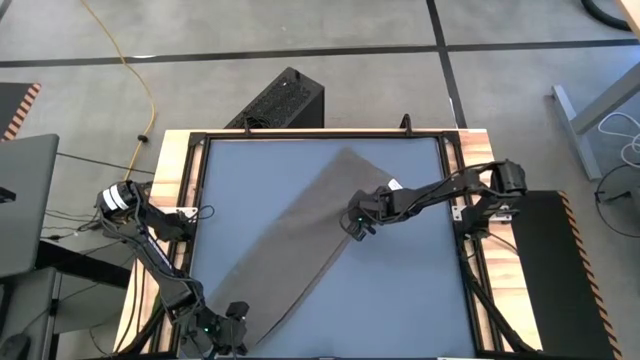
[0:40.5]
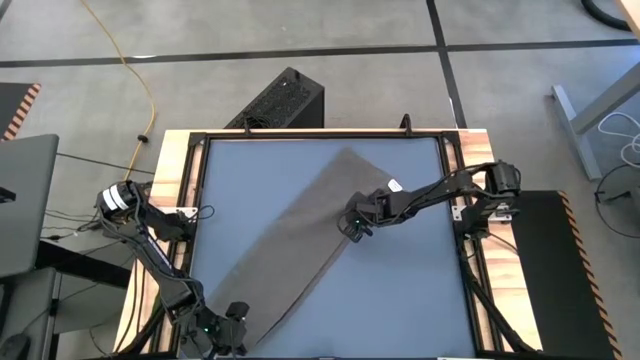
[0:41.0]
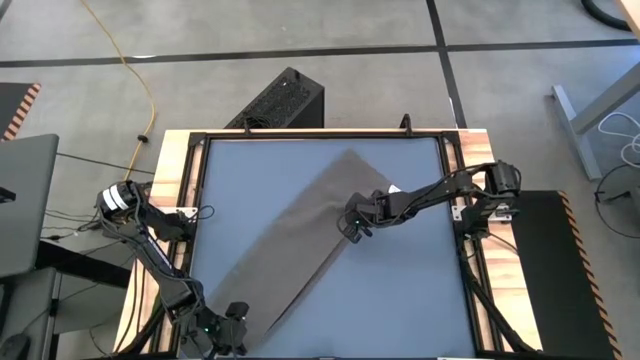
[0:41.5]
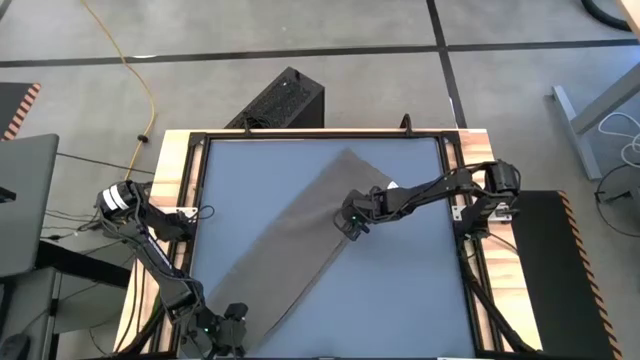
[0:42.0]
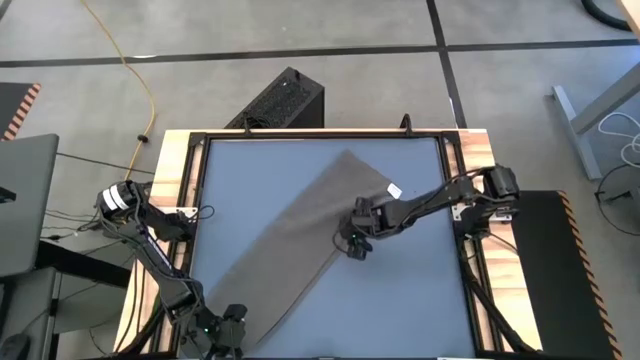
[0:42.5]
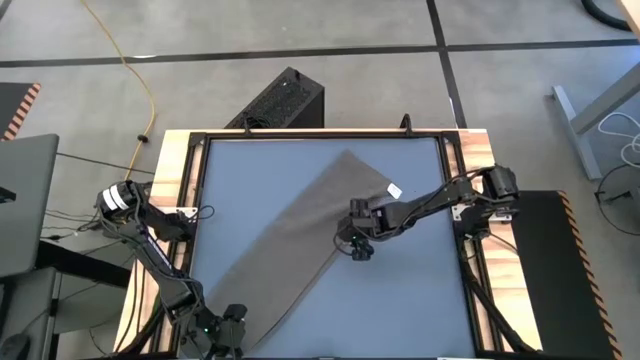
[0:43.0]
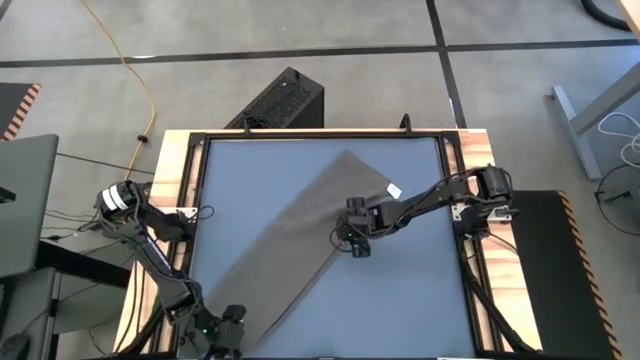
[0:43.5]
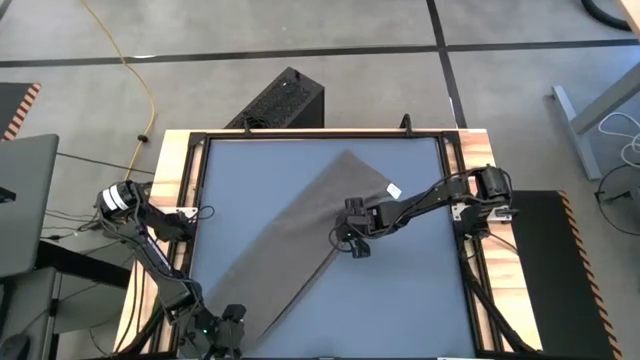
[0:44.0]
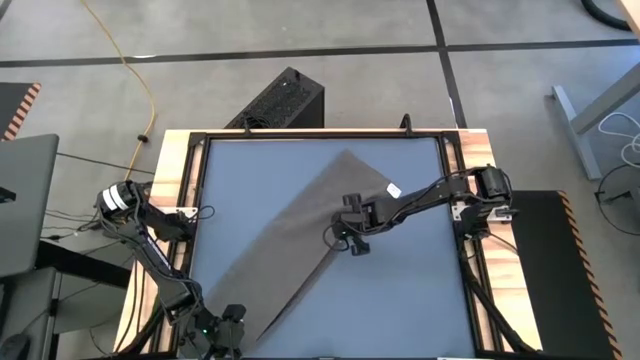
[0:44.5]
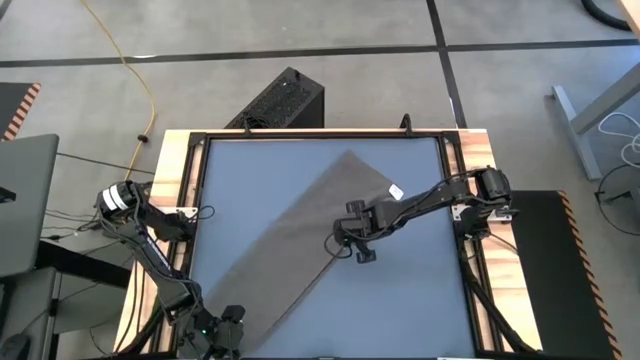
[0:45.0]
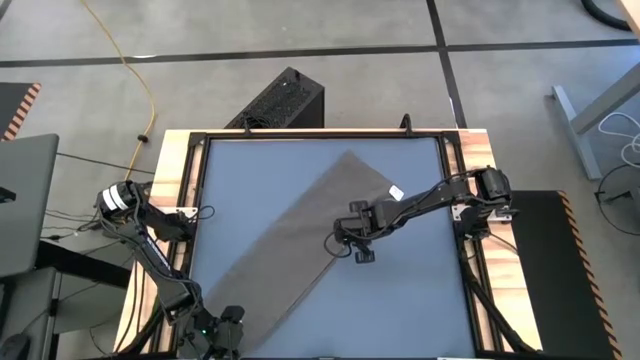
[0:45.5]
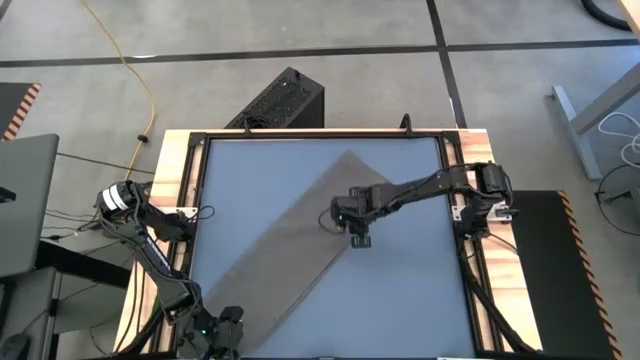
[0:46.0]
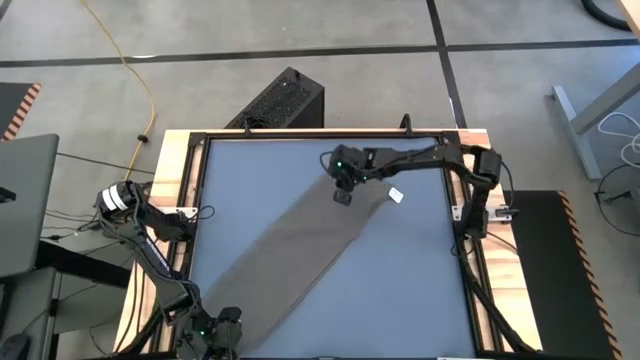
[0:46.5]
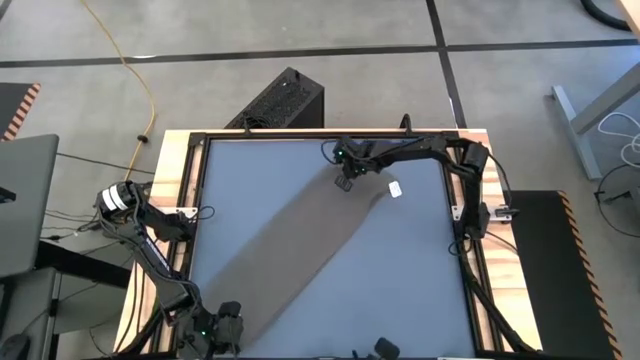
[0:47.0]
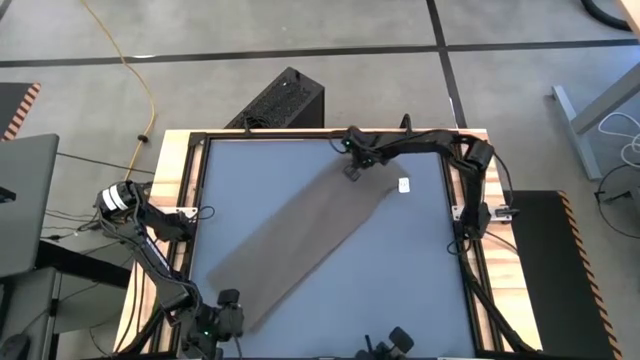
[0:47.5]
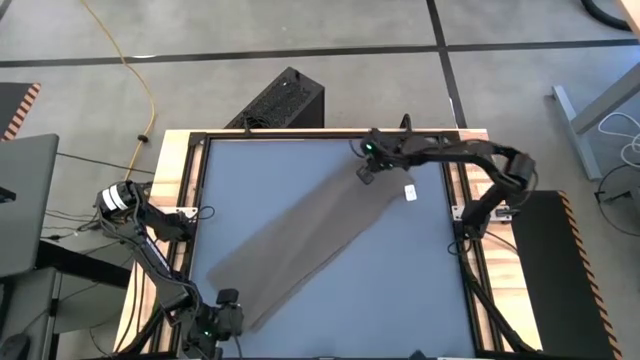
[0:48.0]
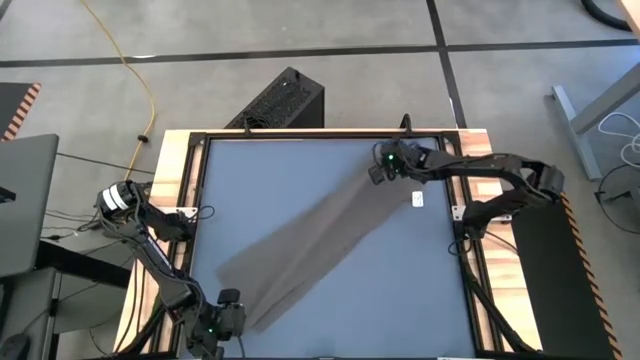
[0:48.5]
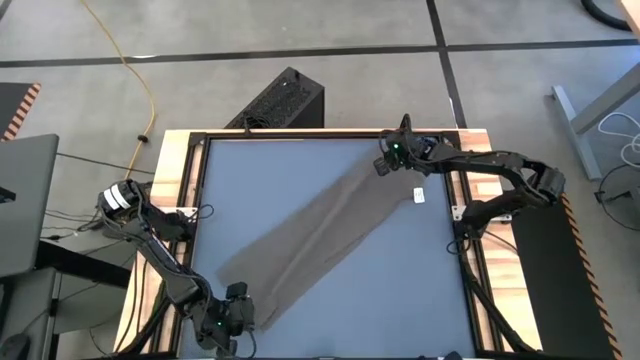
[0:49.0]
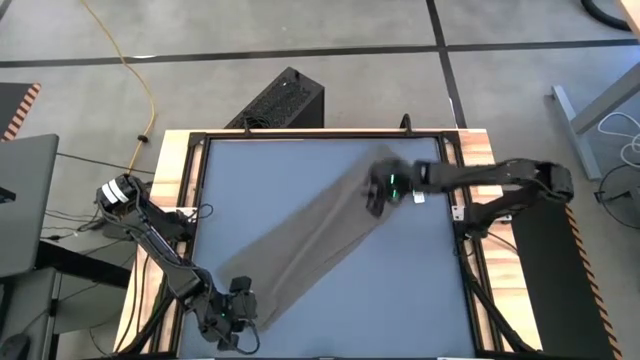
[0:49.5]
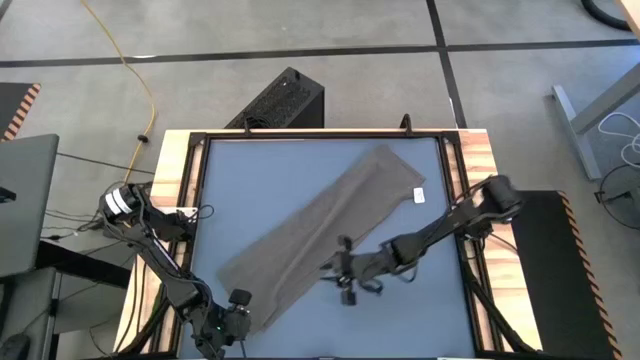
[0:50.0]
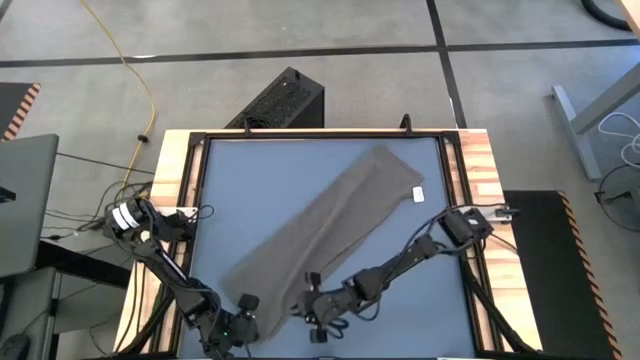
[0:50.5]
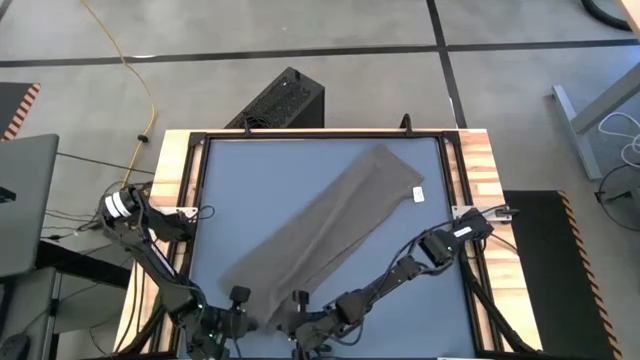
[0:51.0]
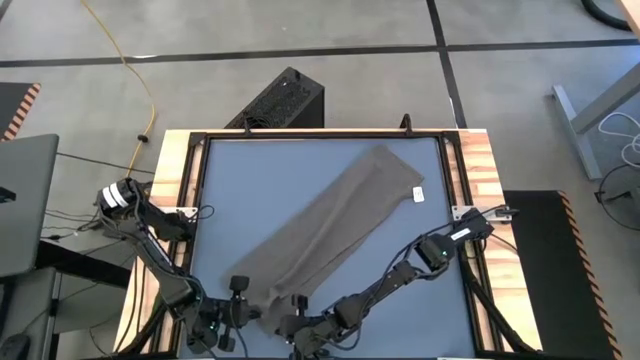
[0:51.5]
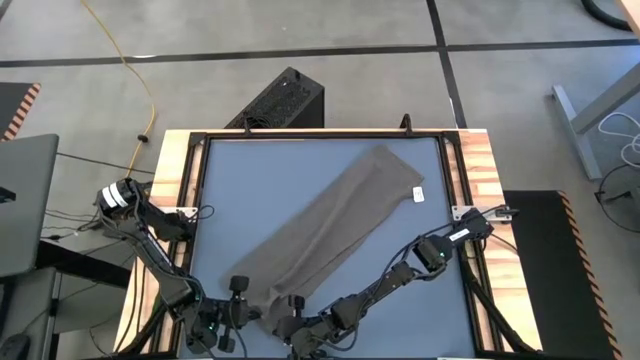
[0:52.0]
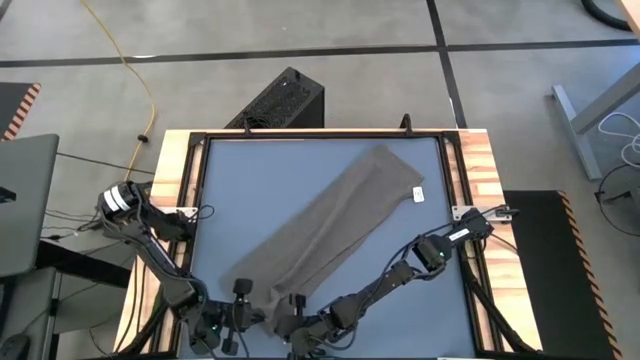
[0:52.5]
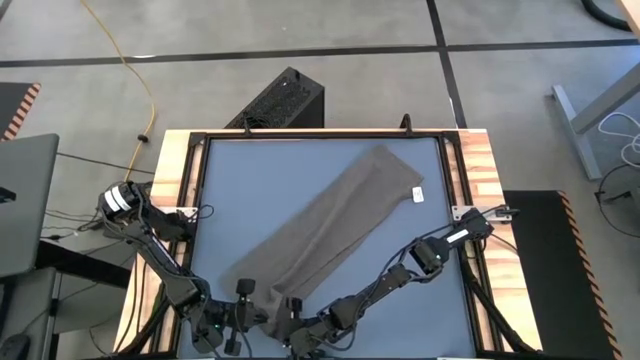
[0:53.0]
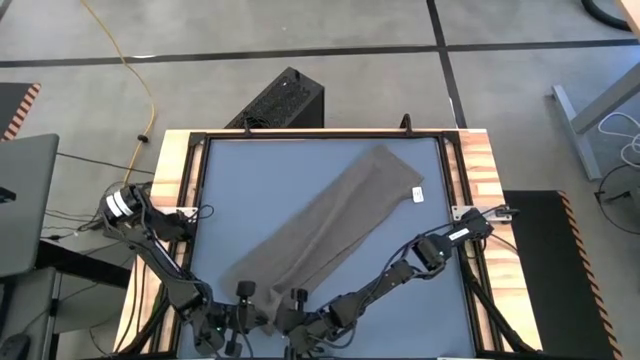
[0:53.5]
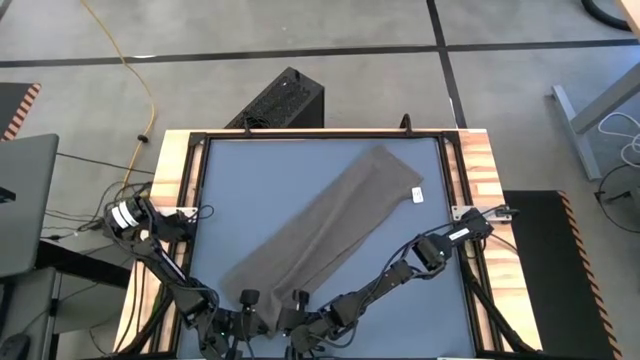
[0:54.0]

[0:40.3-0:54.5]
Task: Roll towel
Roll the gray towel

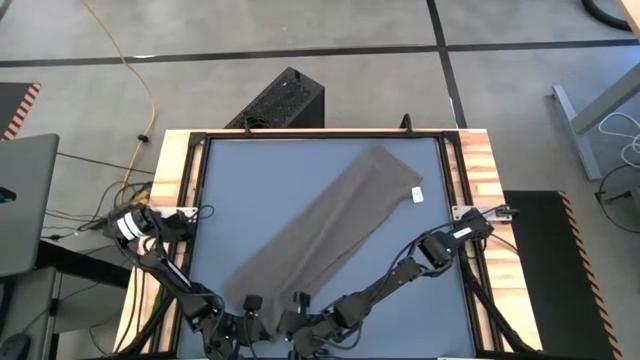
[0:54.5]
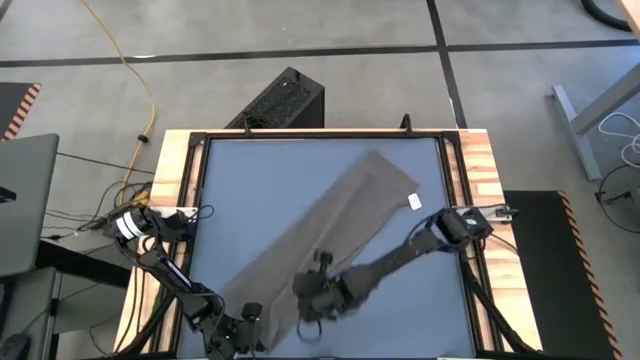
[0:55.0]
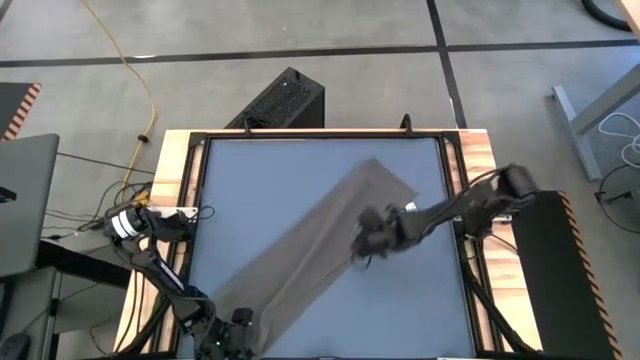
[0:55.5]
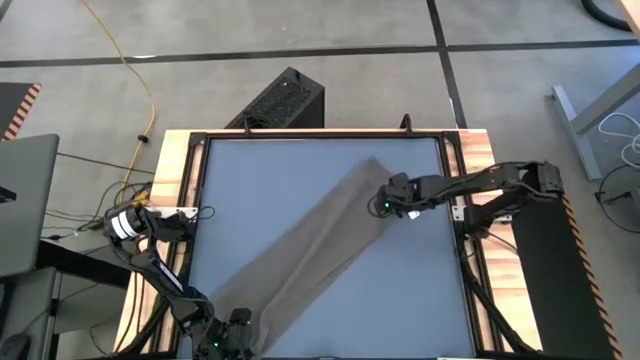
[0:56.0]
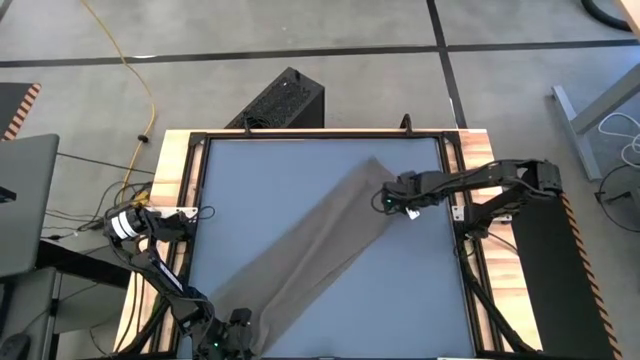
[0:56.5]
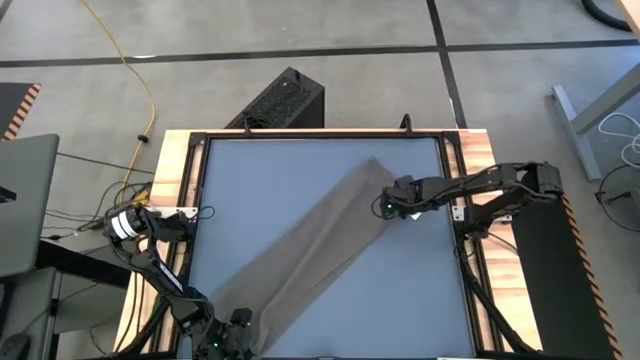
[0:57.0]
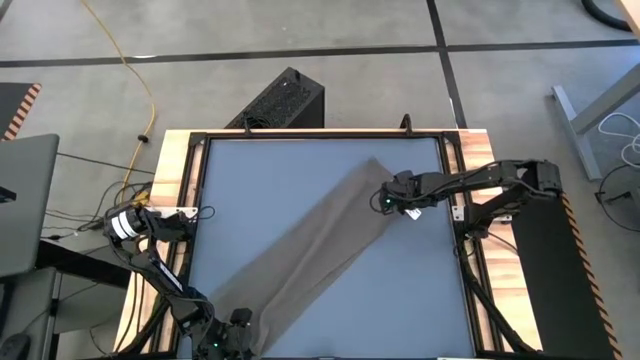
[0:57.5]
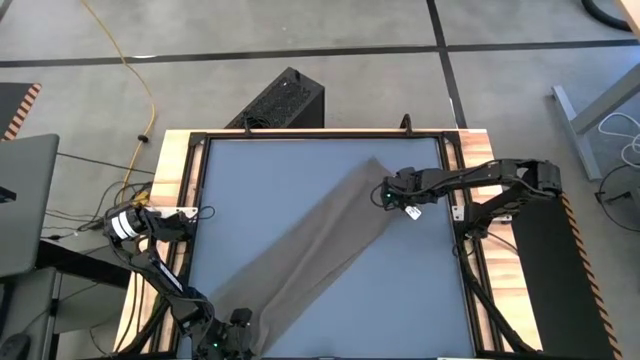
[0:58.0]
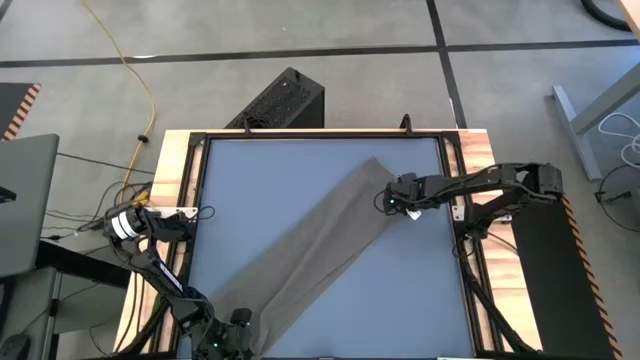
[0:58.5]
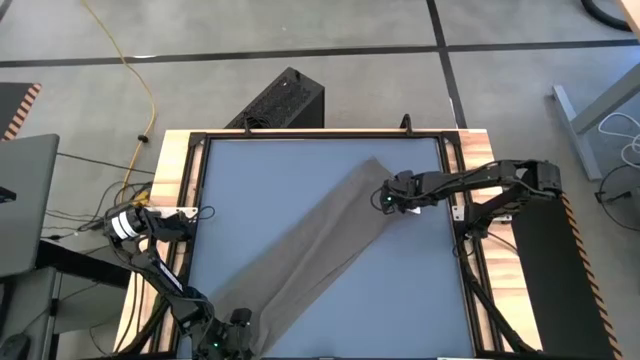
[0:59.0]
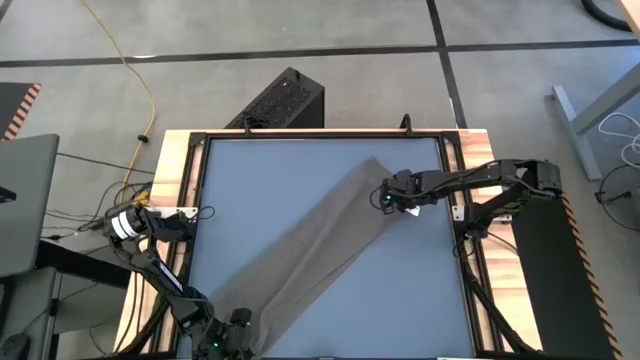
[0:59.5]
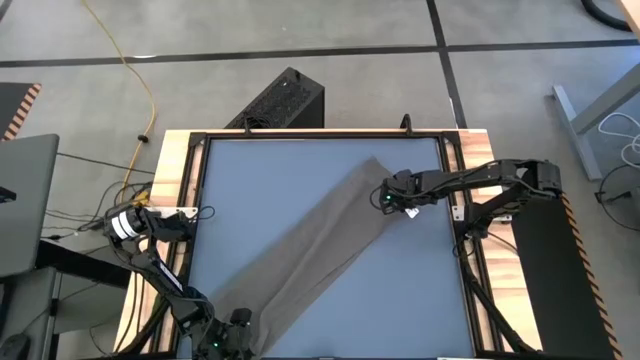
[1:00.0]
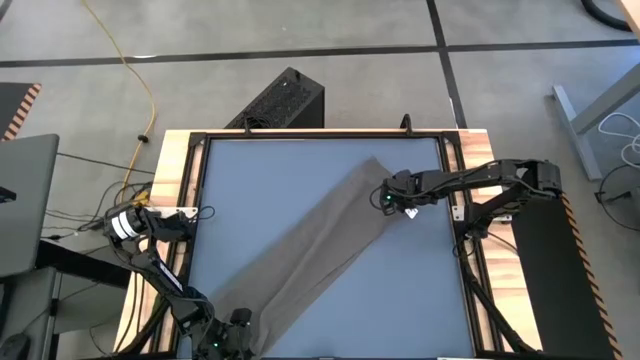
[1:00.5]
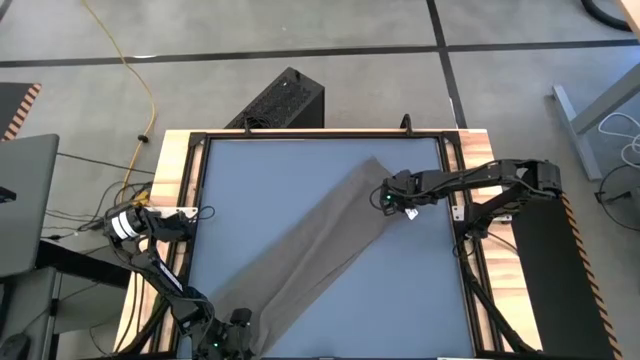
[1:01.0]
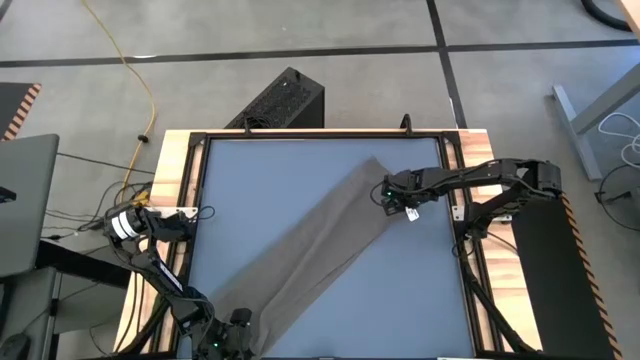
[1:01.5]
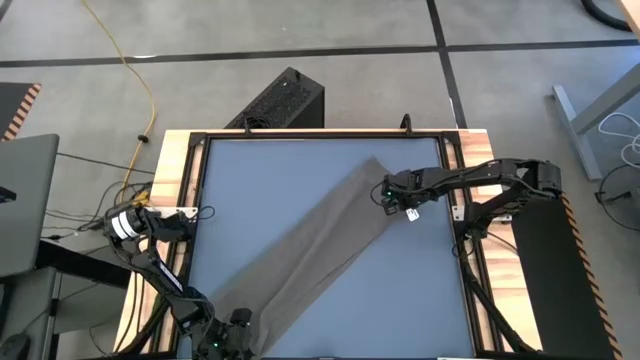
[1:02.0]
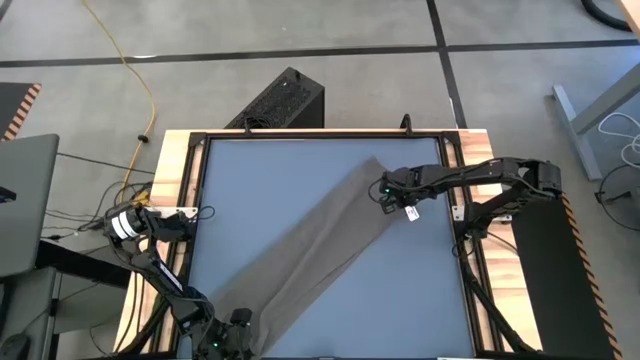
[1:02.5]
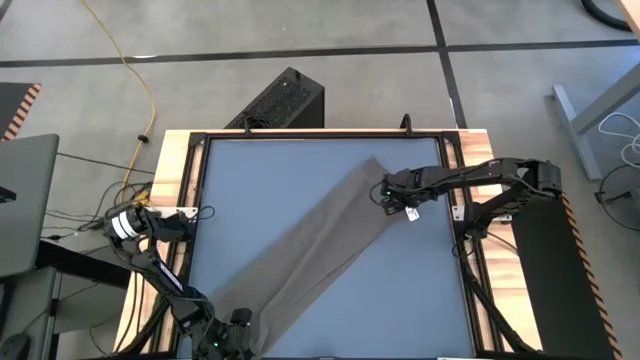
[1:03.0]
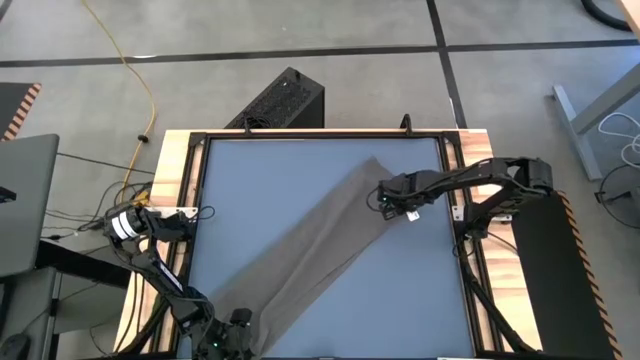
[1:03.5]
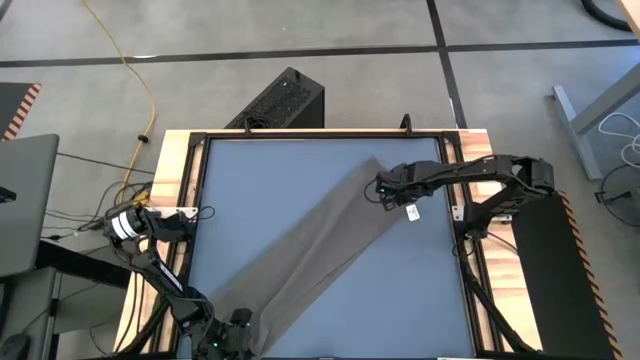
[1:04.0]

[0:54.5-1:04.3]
Roll the gray towel
